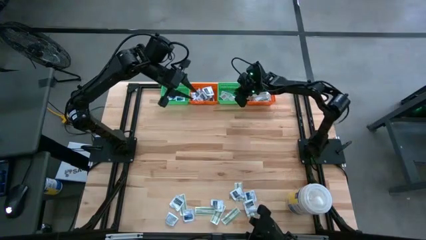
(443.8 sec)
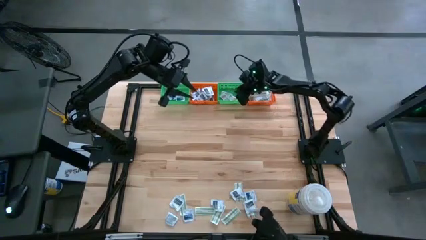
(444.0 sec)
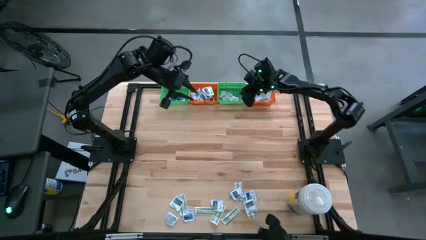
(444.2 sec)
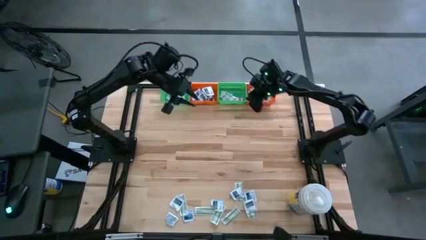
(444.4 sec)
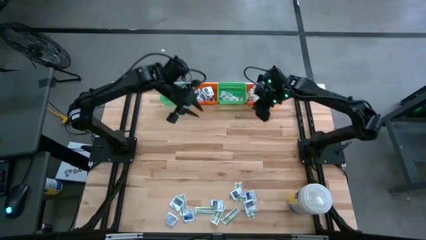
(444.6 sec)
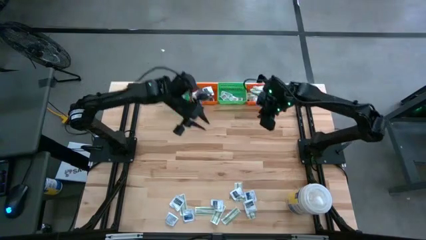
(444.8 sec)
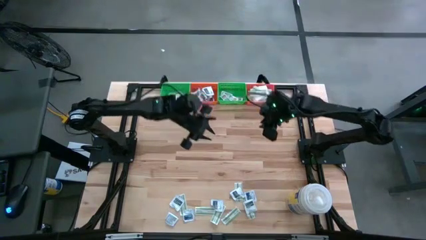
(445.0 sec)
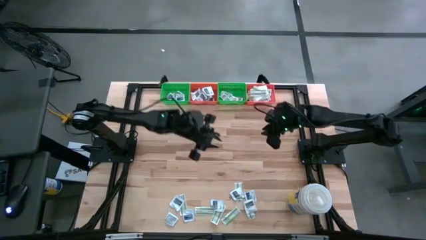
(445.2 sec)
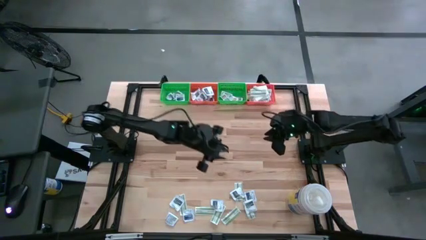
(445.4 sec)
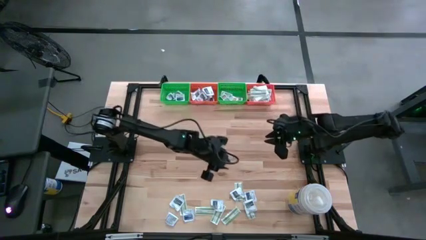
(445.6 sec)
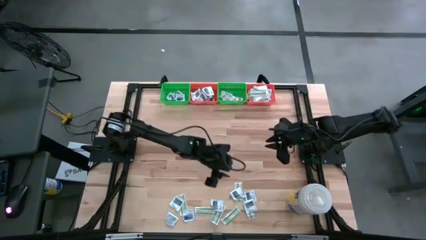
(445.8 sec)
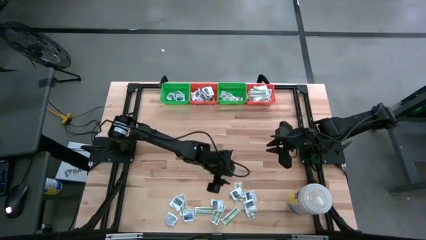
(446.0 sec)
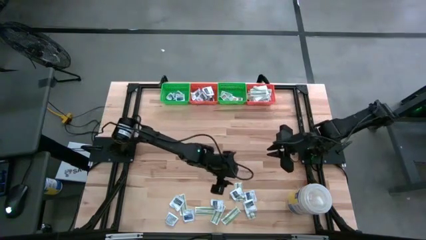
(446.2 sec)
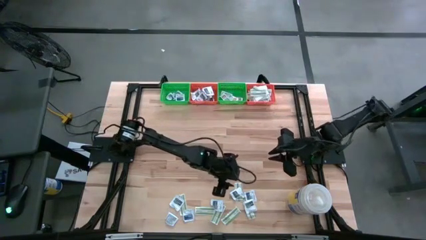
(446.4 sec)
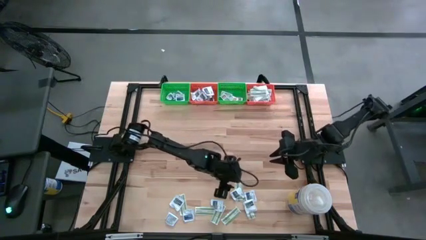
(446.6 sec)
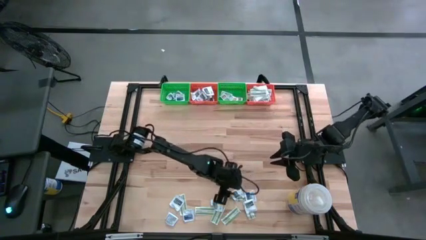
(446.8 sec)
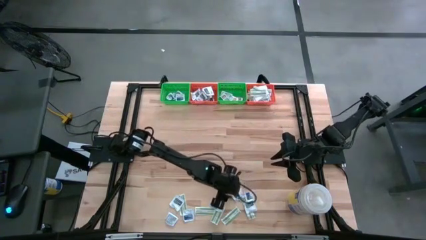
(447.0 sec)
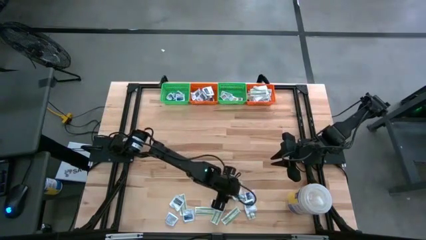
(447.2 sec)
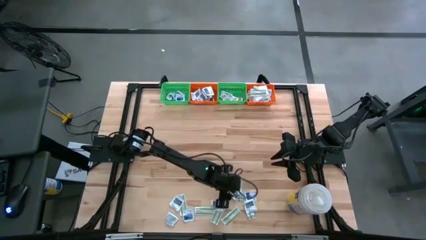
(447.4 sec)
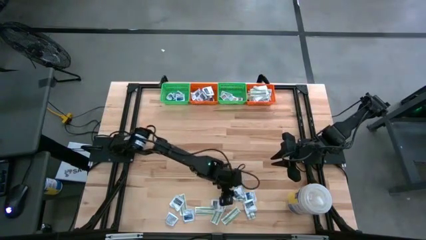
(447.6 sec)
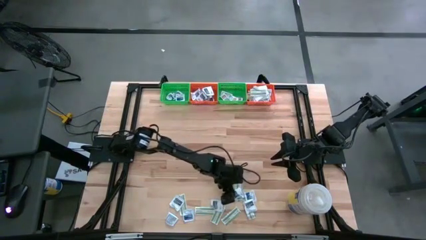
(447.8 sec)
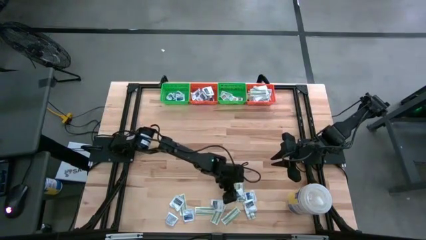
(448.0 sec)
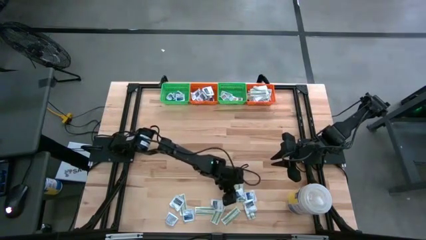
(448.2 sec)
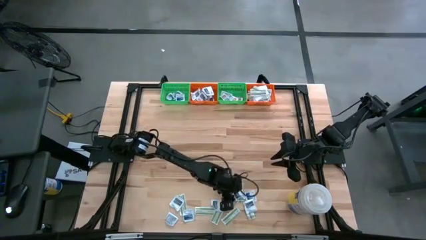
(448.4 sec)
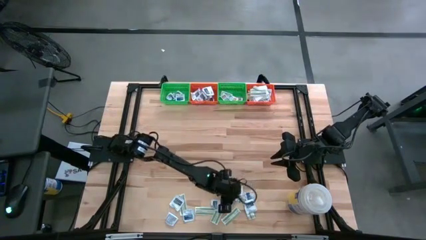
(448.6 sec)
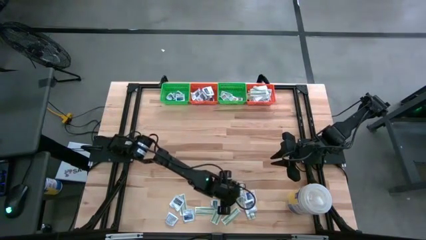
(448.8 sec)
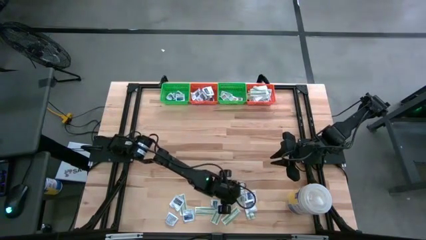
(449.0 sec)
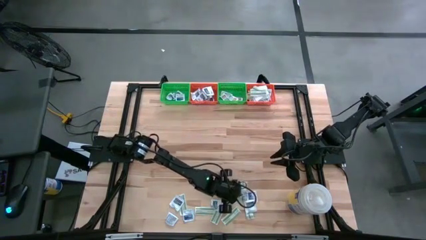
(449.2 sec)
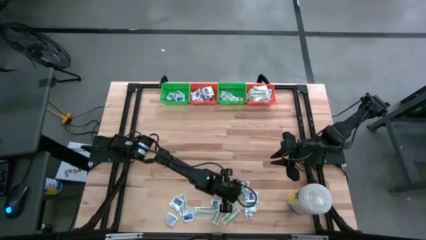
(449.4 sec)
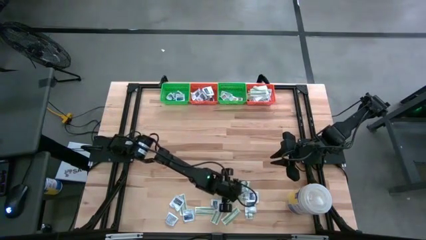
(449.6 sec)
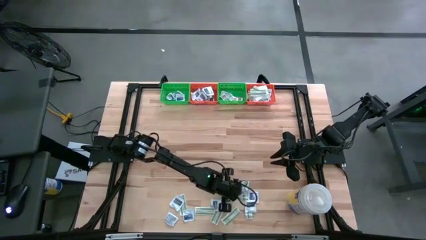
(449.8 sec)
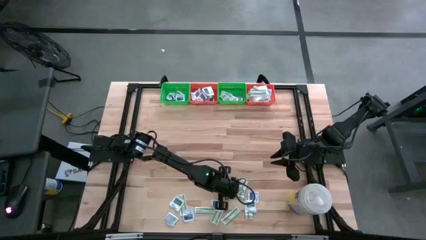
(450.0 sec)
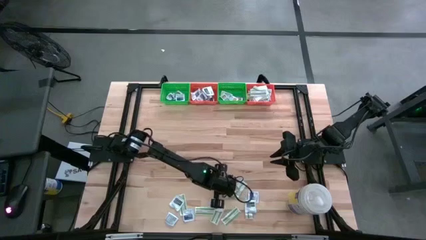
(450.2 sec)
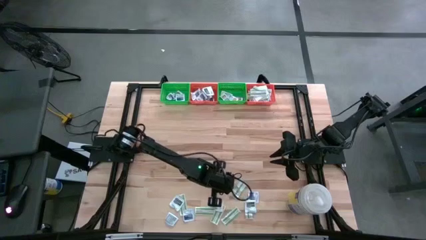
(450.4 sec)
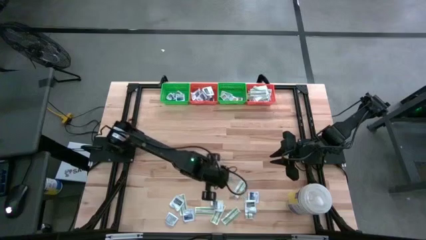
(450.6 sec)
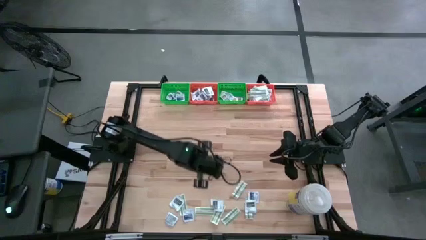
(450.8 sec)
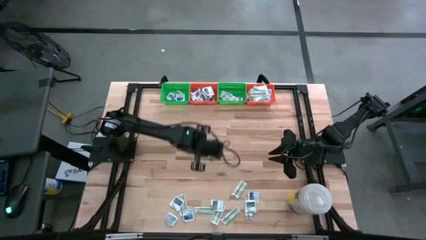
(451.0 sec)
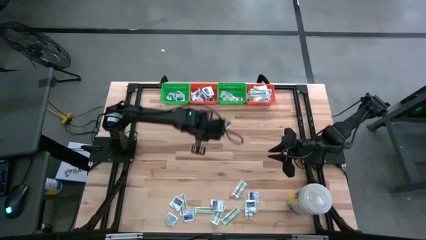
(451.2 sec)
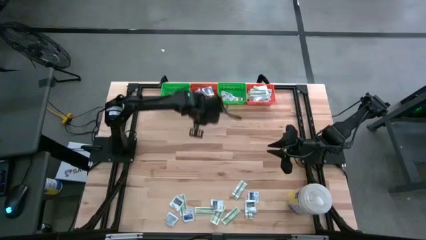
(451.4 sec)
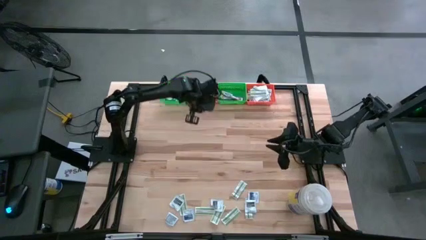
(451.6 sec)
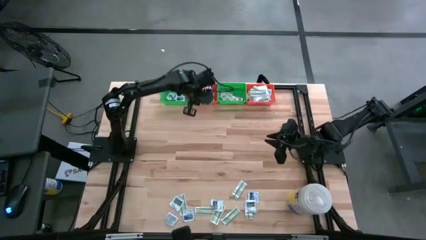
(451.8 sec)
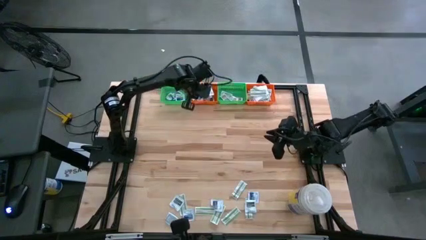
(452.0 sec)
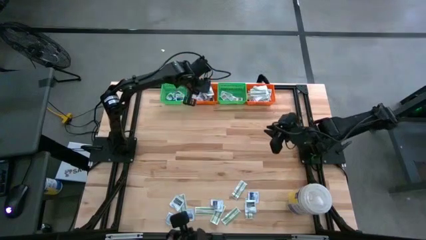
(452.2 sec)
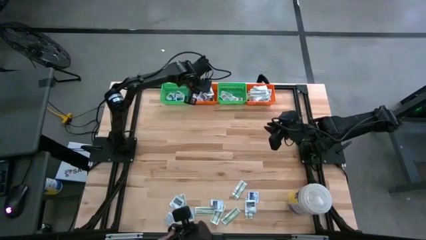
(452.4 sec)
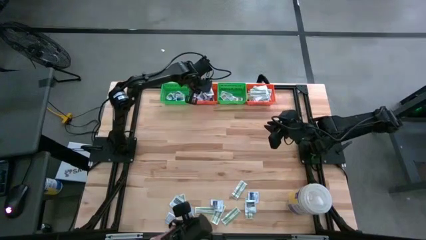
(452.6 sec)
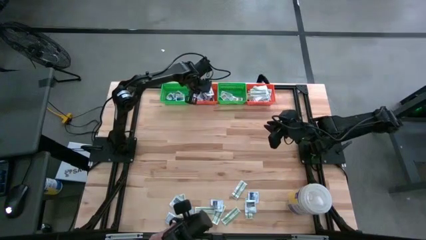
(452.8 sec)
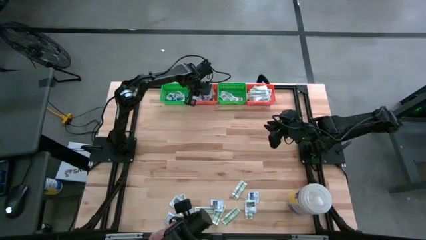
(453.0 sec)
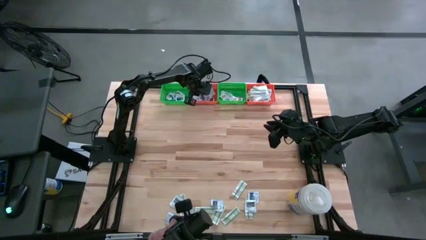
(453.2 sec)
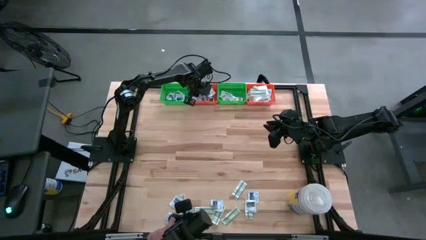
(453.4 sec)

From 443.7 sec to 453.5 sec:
Task: Pick & Place First Aid Supplies
Put the gray towelette pack in the left orange bin

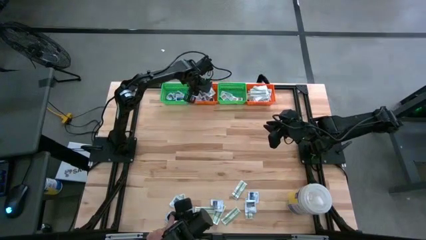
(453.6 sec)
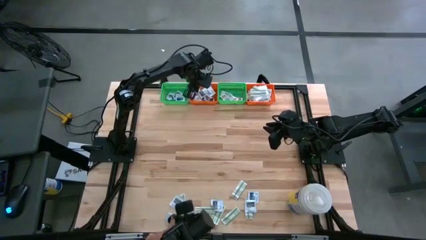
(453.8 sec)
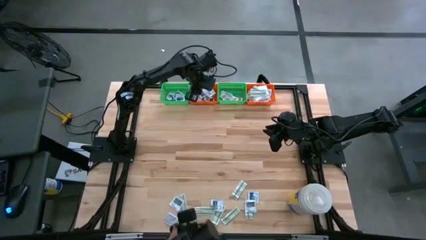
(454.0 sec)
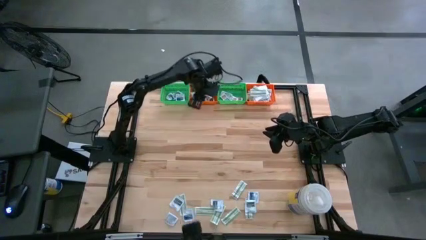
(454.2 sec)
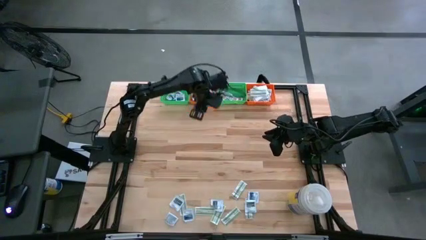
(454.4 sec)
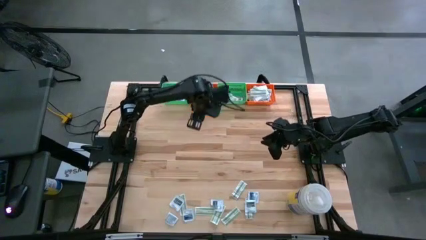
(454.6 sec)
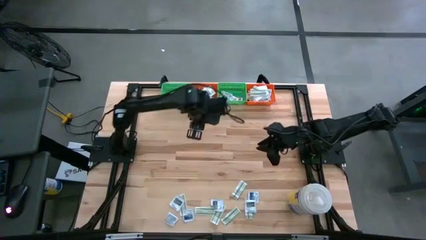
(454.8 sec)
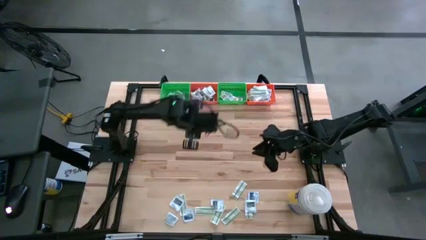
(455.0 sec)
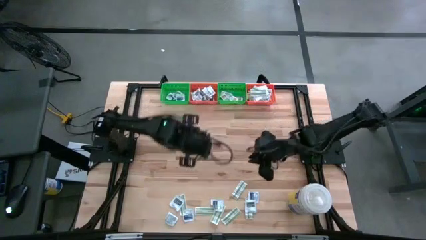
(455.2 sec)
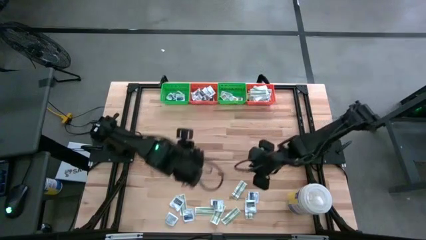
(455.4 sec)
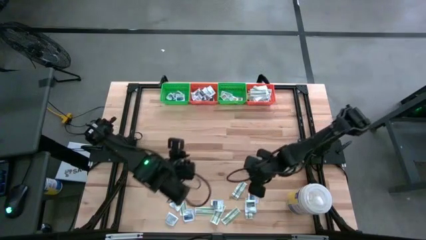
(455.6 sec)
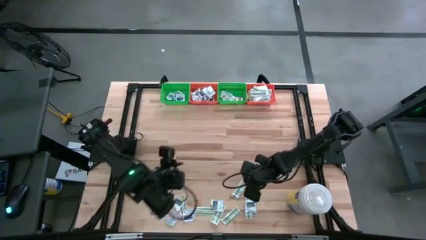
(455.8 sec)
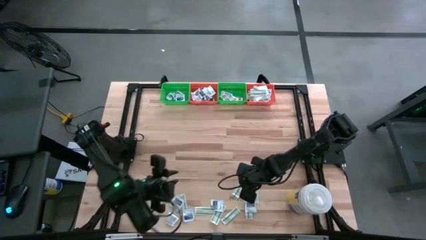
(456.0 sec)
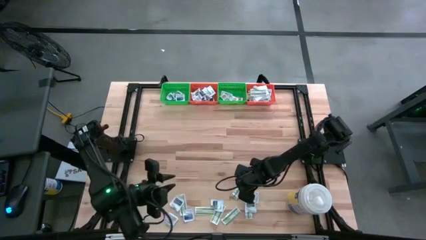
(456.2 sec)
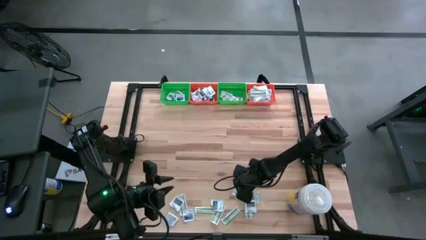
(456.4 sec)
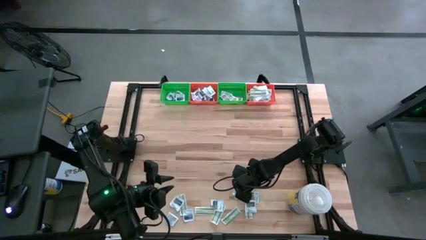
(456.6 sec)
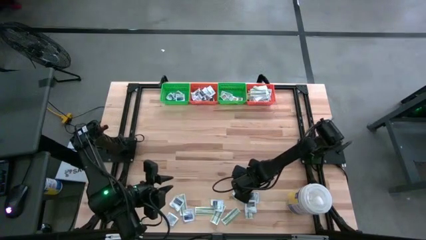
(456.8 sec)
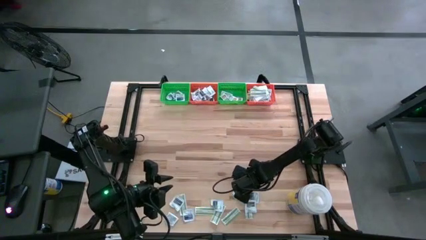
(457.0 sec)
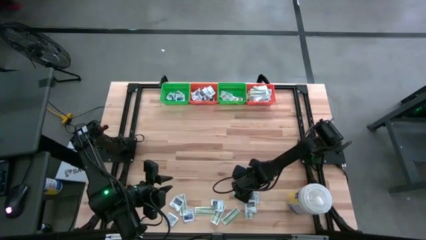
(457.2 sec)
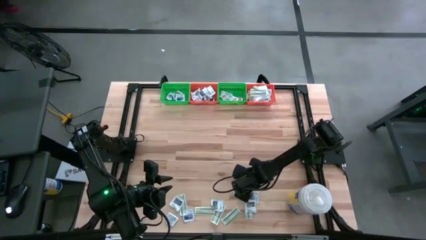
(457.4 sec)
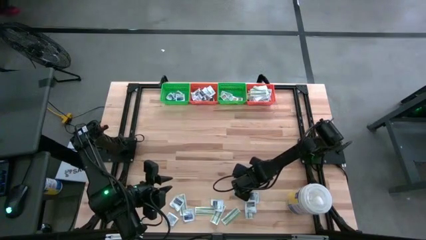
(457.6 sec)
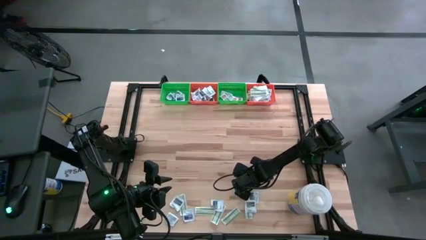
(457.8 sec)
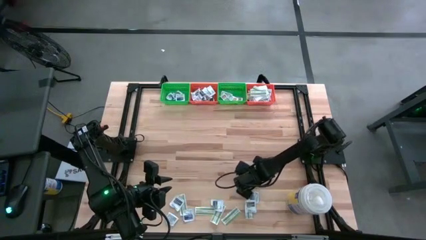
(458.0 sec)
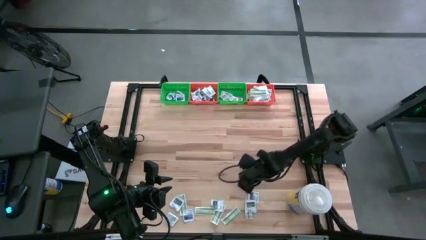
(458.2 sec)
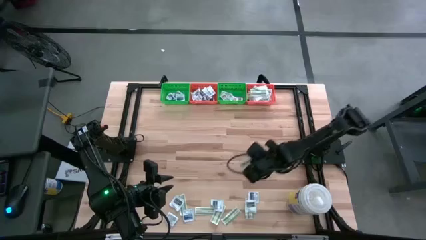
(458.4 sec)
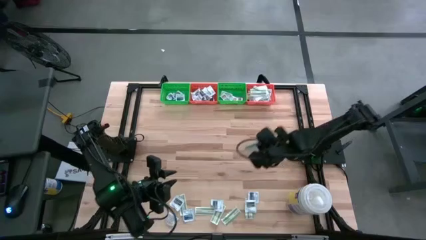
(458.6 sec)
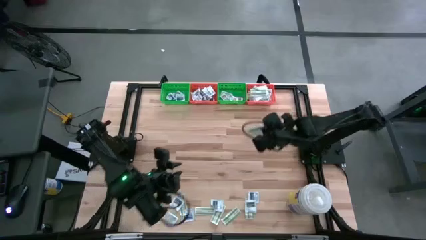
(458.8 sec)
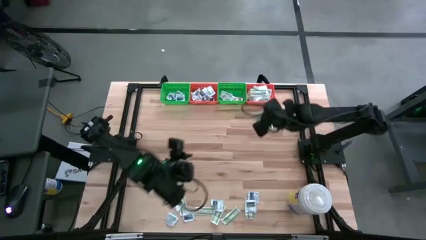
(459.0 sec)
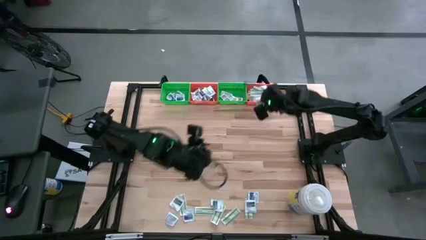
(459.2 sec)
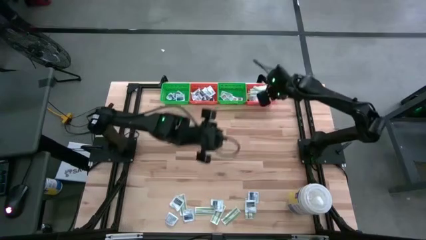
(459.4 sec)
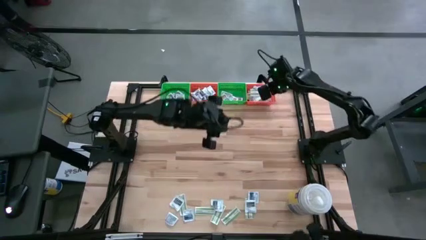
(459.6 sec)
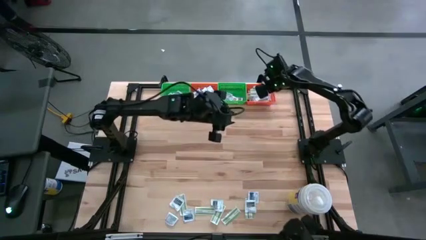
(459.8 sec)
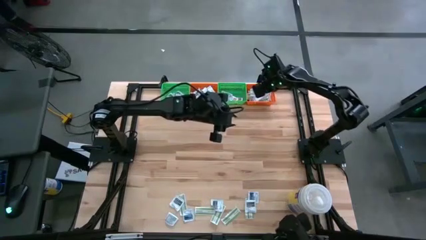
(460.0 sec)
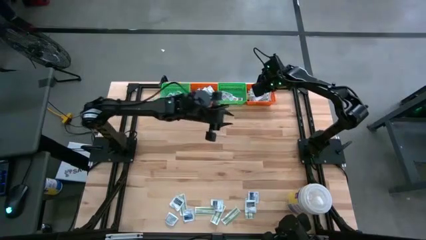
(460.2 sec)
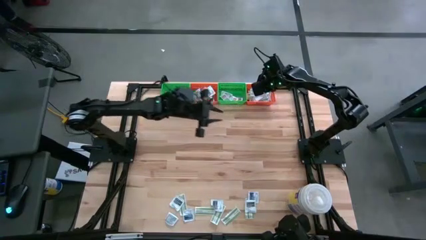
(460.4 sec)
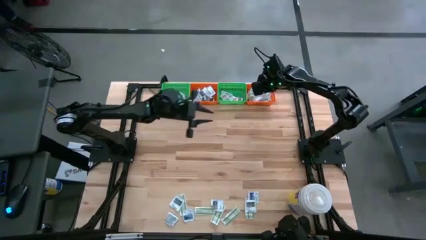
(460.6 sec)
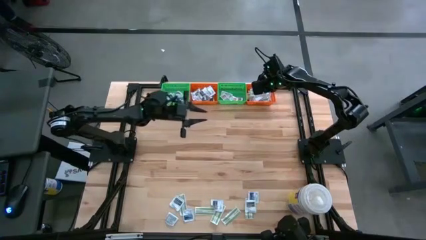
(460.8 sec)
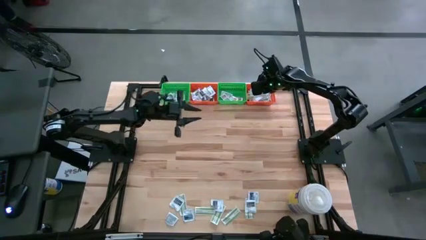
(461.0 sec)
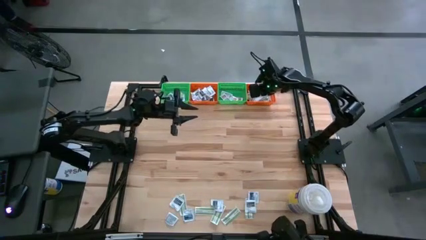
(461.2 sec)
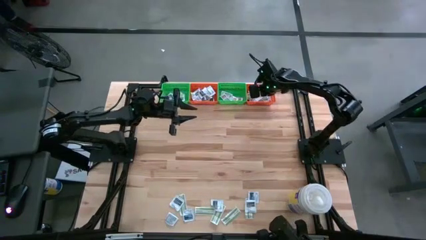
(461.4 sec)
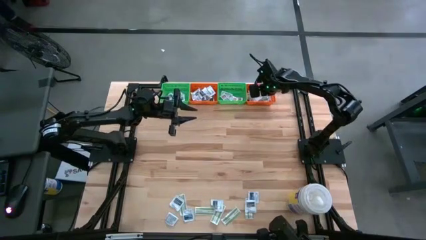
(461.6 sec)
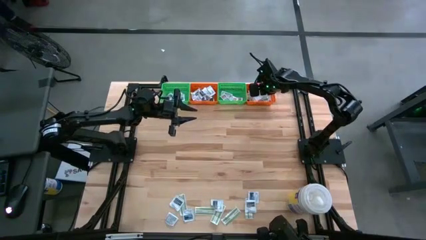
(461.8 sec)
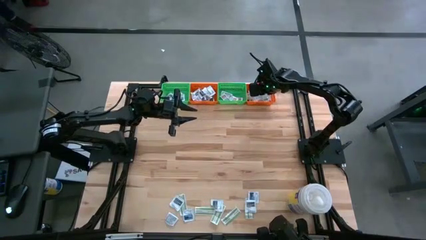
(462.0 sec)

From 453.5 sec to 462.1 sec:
Put the green bandage pack in the right orange bin
